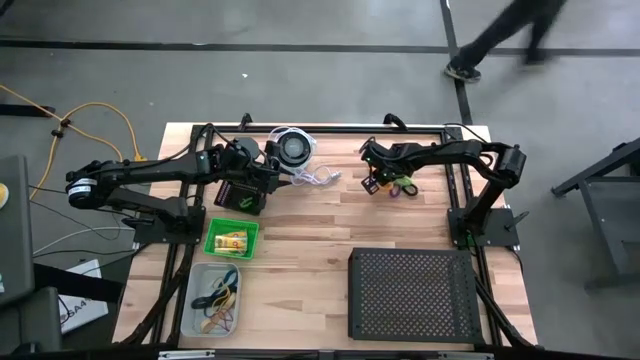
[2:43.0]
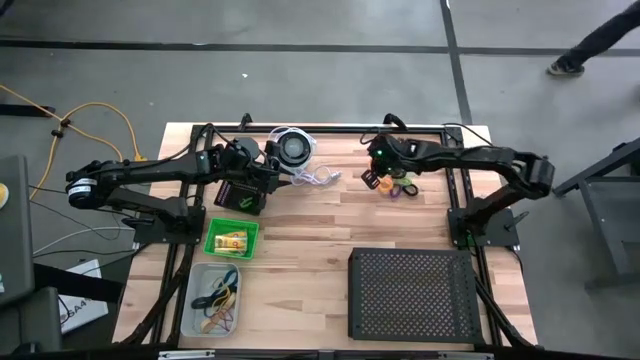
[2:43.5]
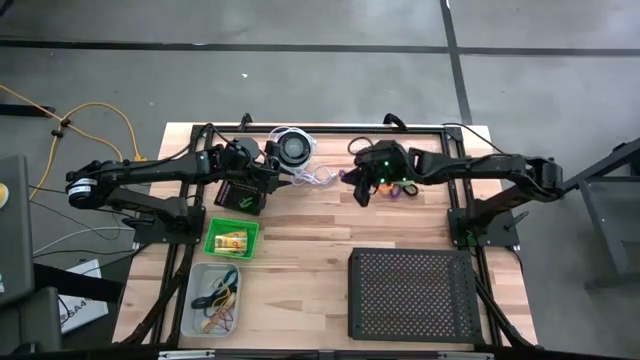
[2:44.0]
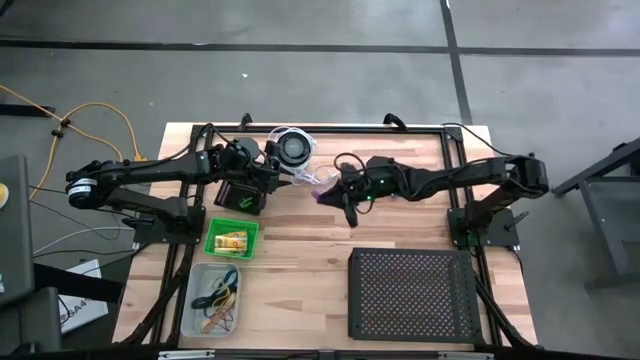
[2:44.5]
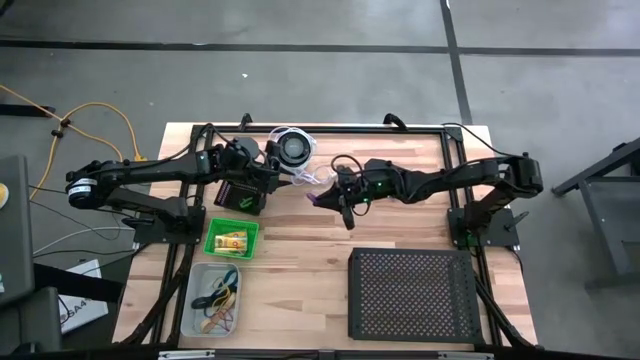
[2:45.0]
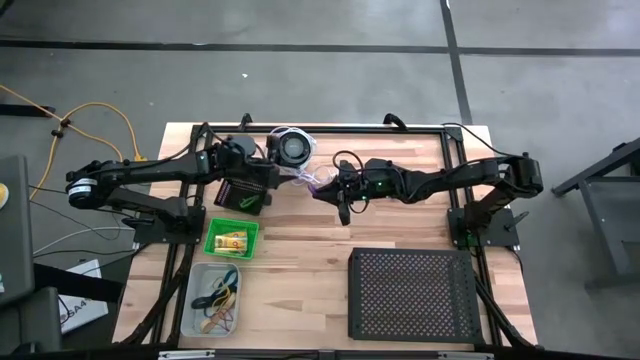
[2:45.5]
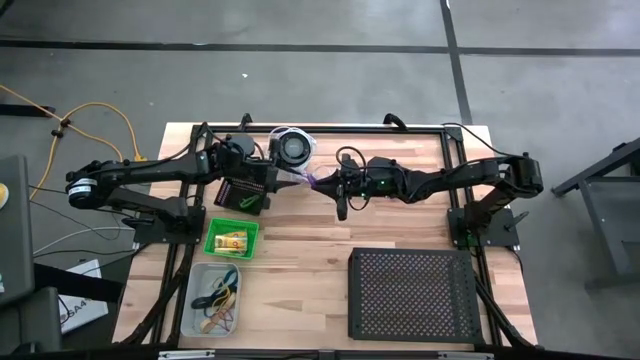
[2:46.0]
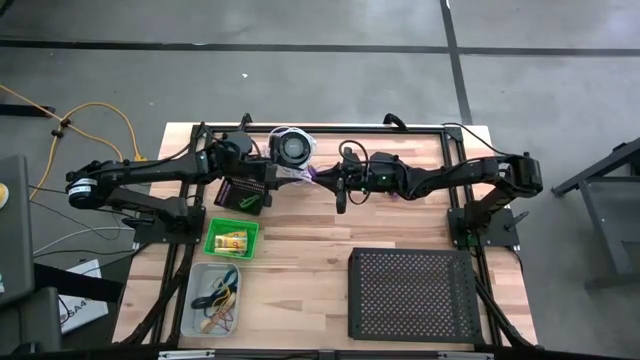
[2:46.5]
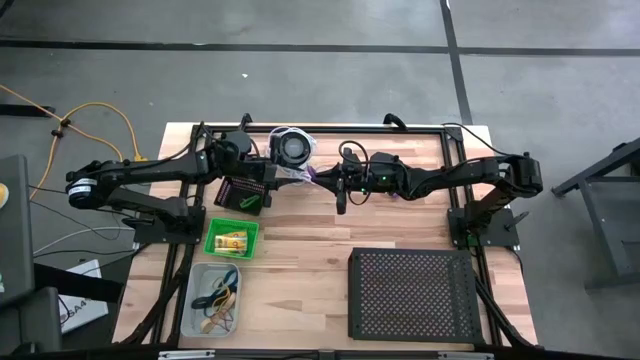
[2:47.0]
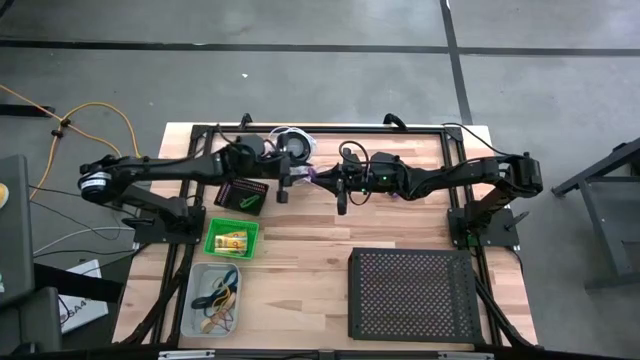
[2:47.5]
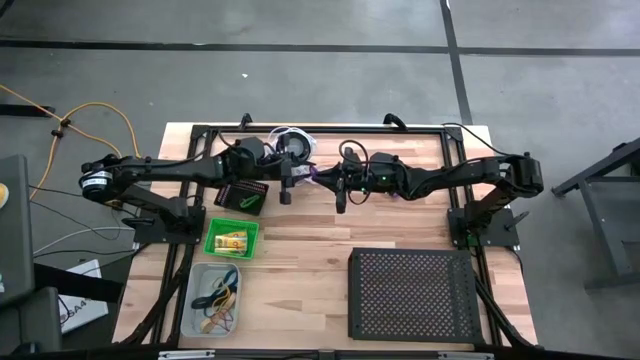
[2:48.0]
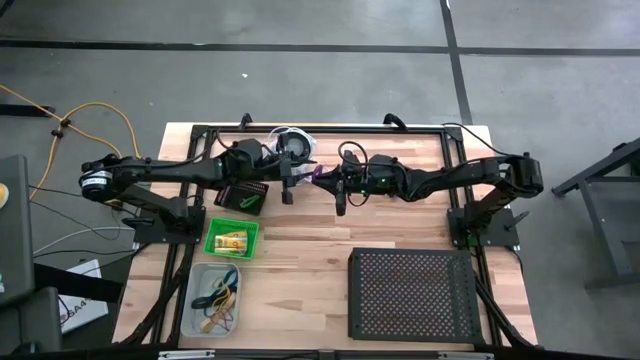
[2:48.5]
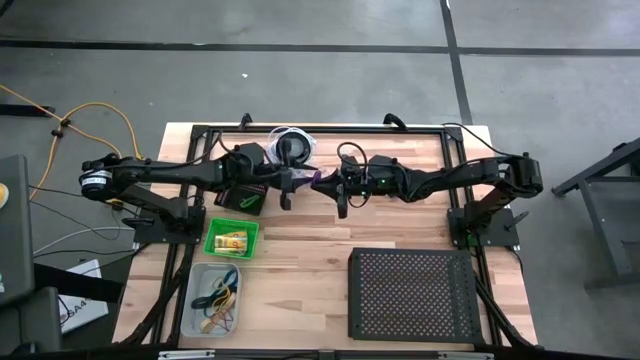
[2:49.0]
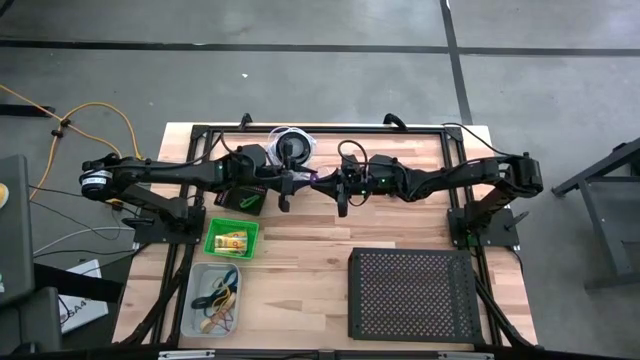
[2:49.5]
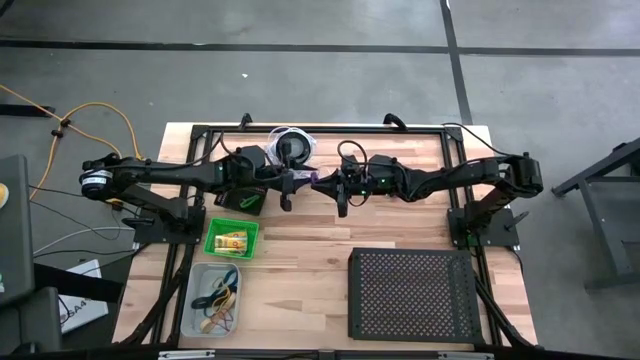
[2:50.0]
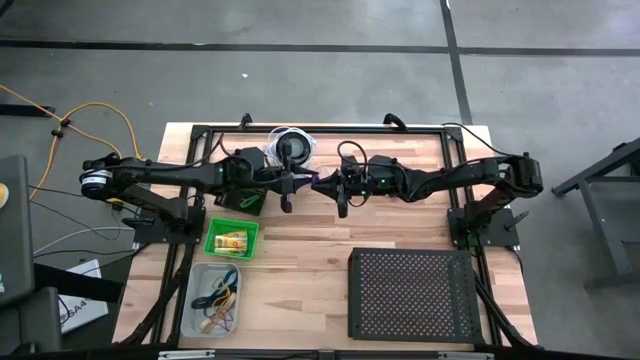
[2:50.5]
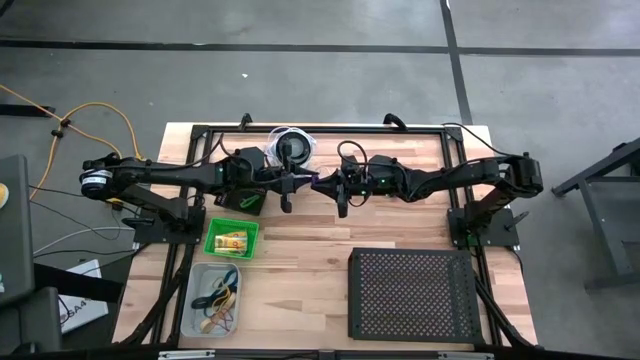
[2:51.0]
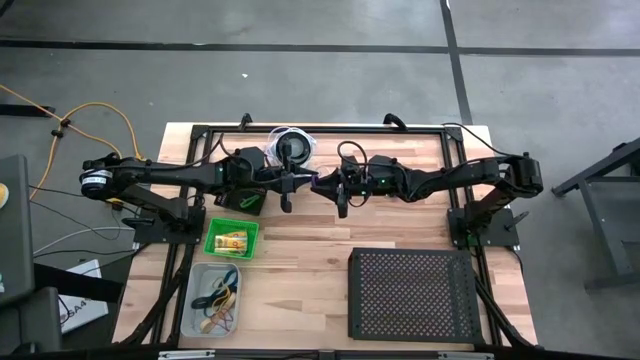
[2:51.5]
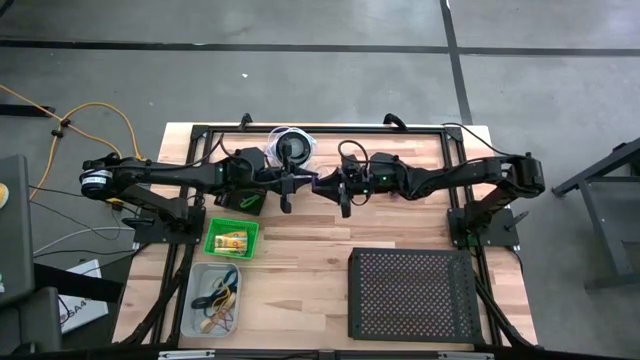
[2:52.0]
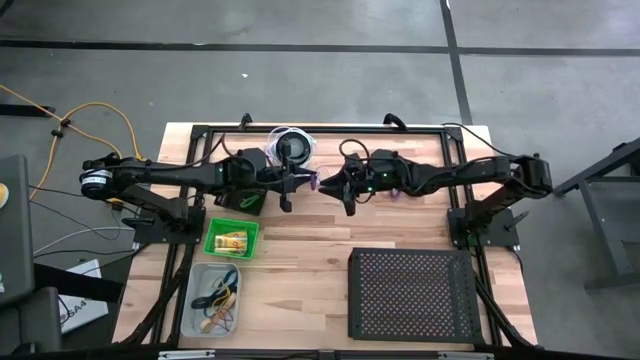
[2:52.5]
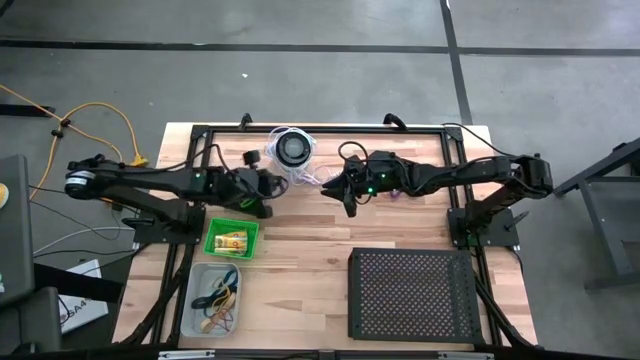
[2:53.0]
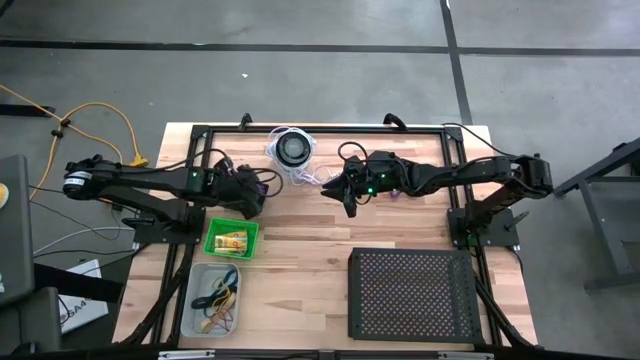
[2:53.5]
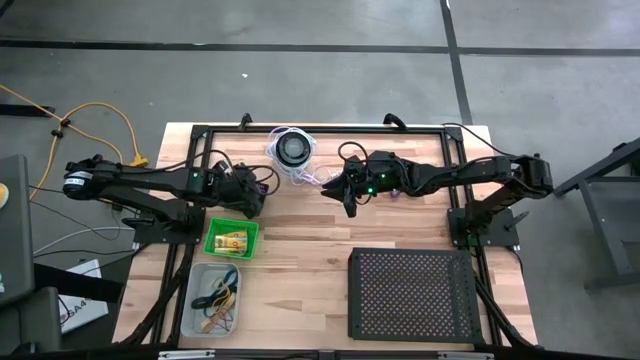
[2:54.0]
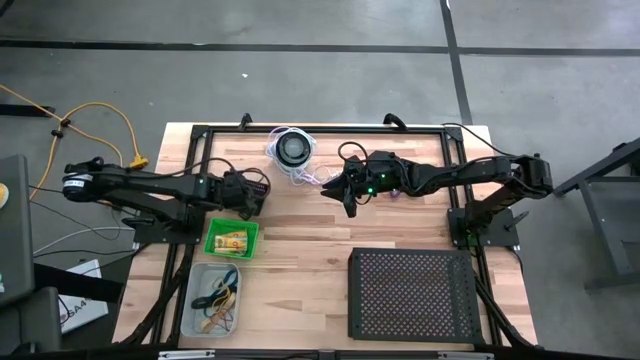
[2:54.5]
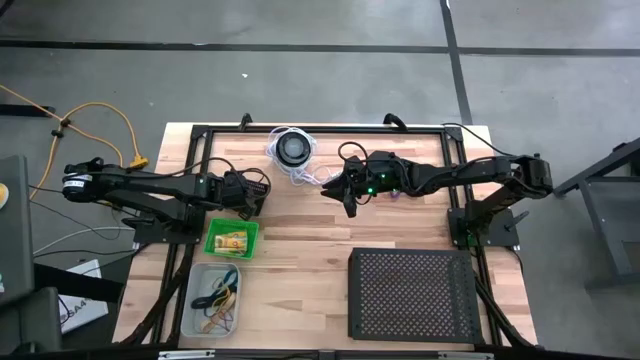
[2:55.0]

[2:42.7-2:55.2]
Task: Pick & Place Office Desk Supplies
Put the purple coil keychain into the black bin

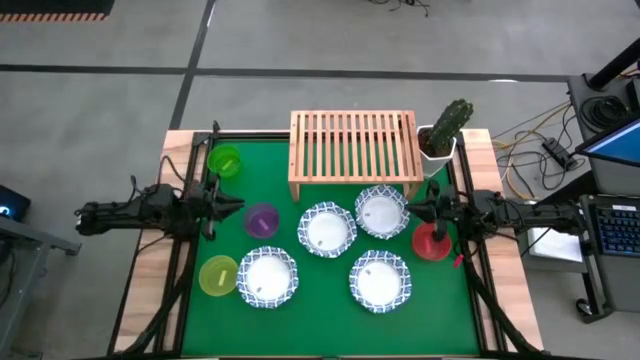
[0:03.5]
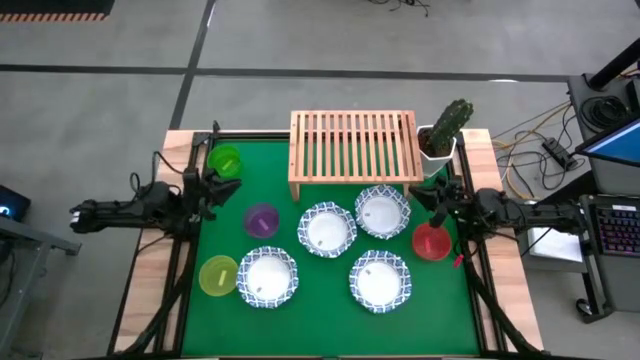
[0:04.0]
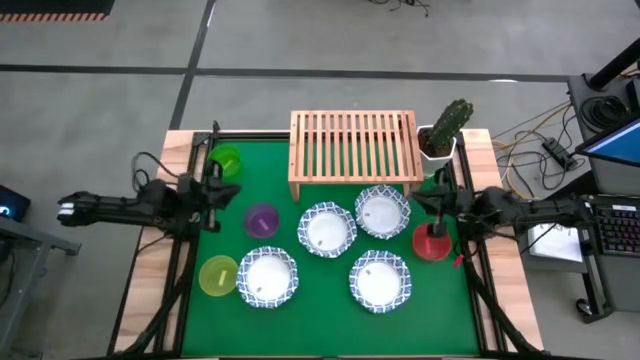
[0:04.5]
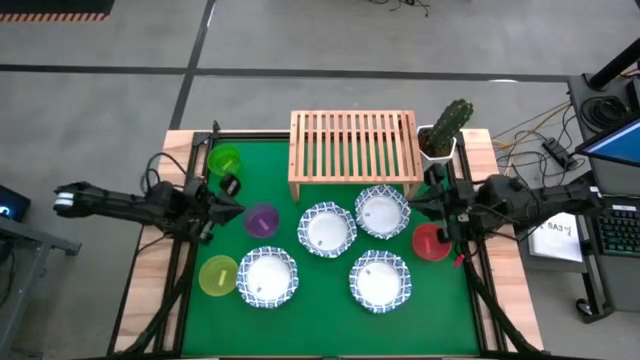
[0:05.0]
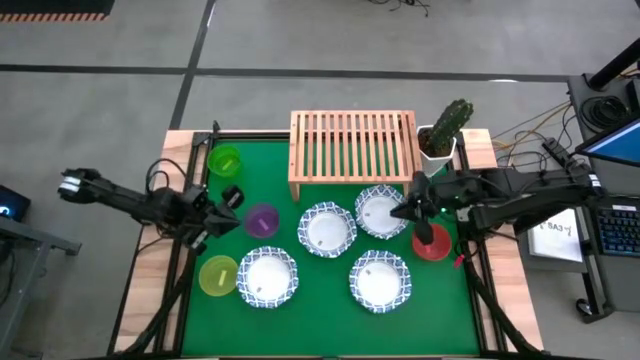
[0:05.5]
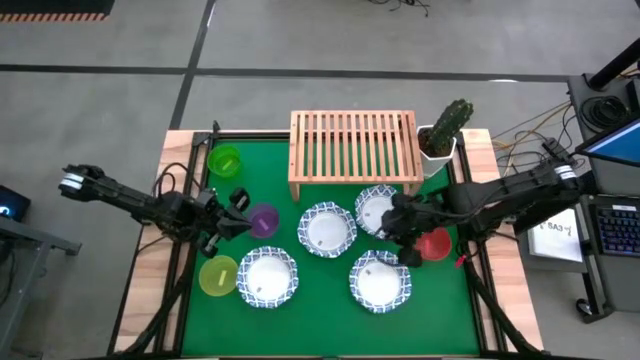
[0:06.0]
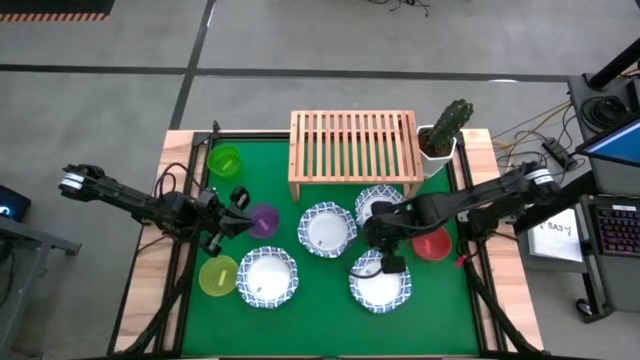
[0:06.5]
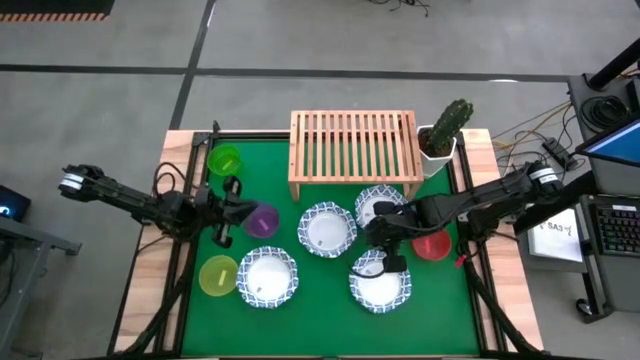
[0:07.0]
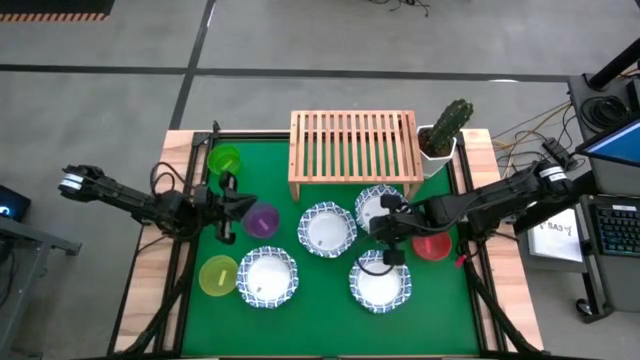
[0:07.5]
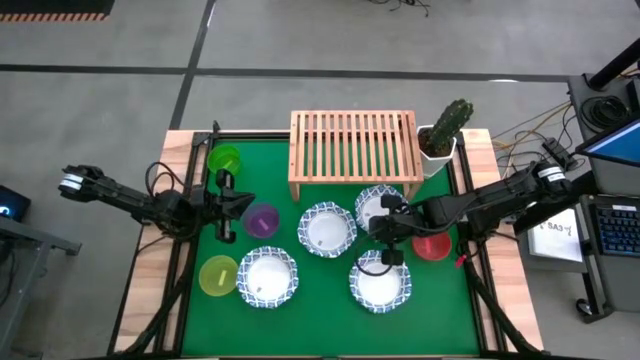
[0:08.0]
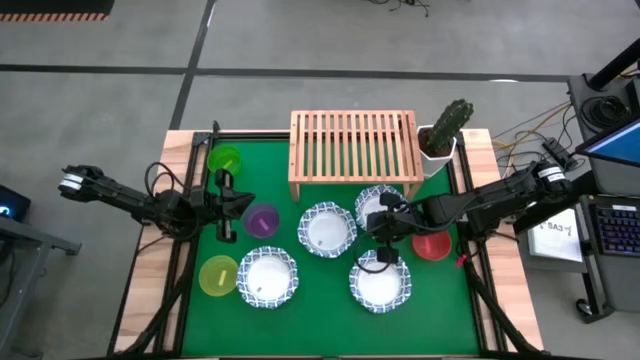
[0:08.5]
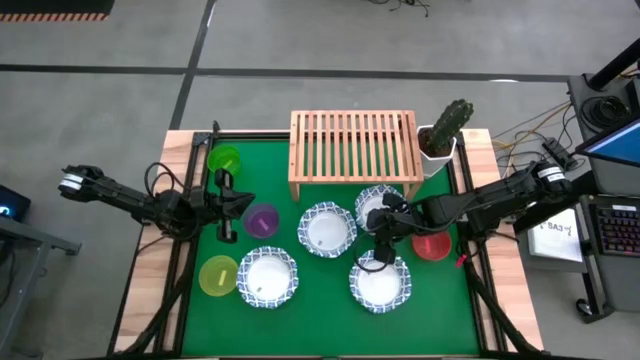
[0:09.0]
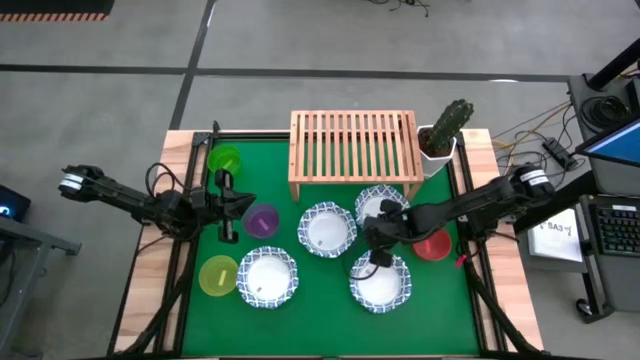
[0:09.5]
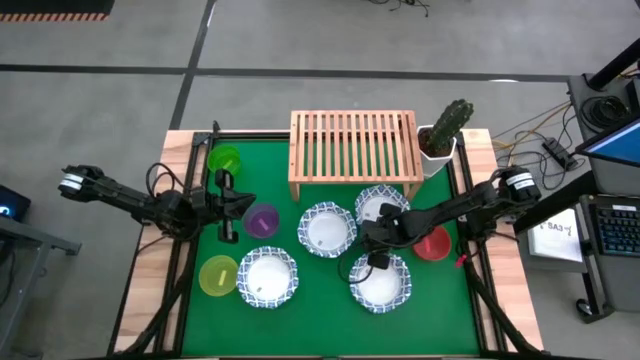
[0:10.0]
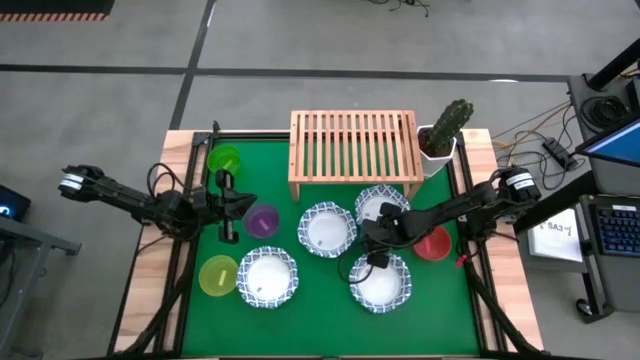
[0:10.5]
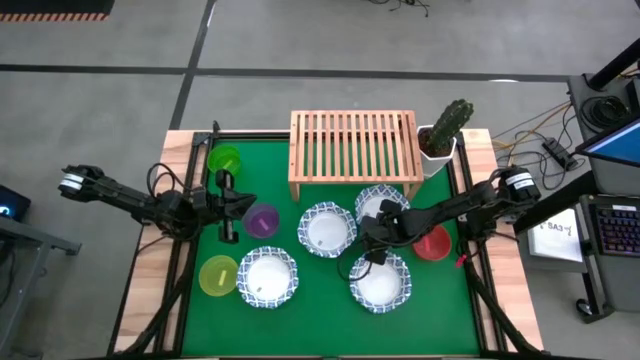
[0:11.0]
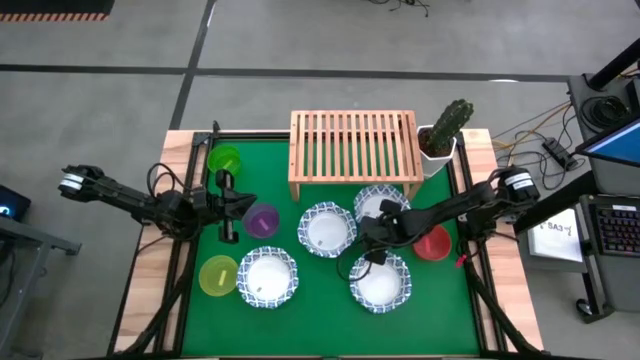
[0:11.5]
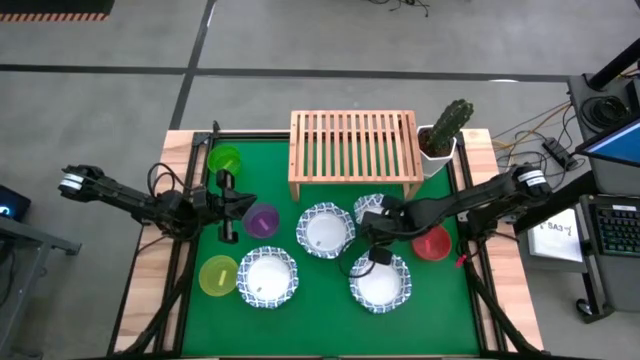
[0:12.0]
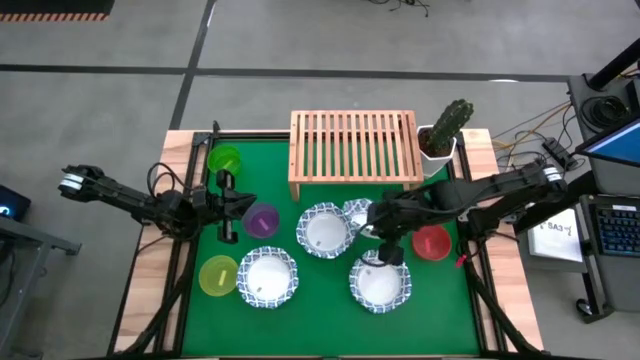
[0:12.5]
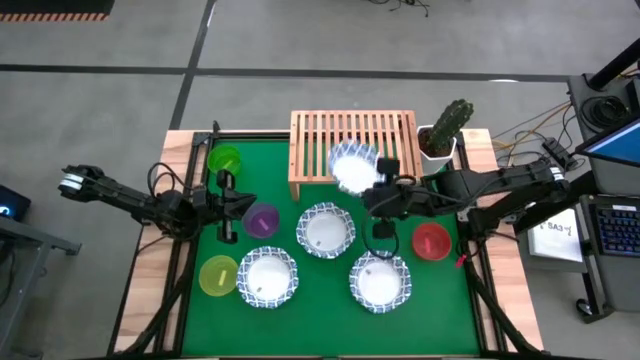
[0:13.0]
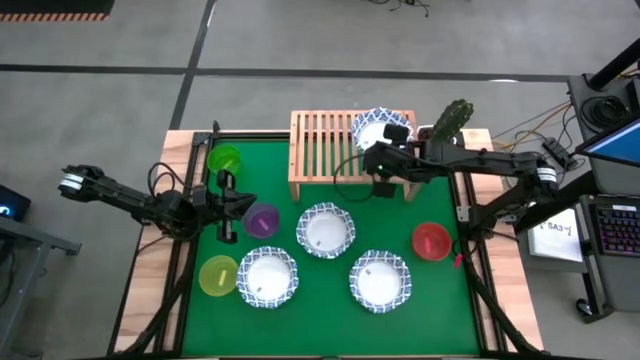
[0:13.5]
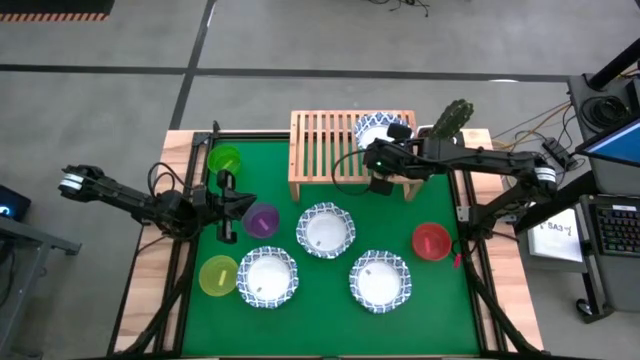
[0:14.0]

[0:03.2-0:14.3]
Task: Place and stack bowls onto a shelf
Put the big white bowl on the shelf
